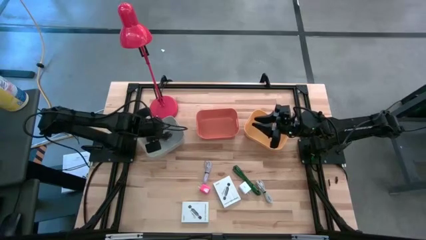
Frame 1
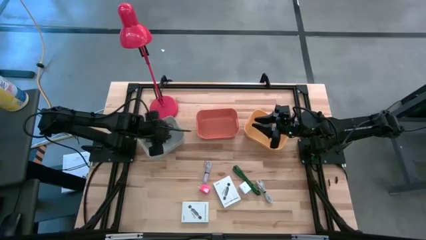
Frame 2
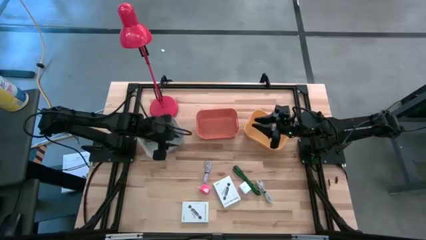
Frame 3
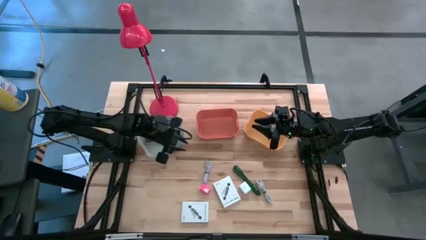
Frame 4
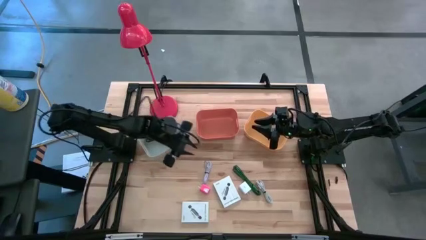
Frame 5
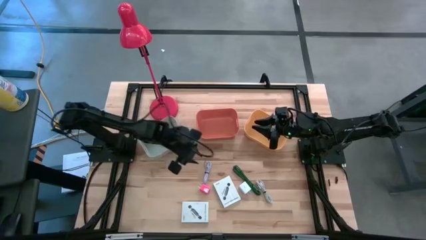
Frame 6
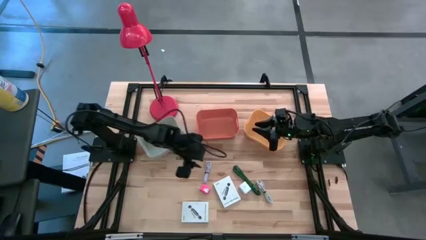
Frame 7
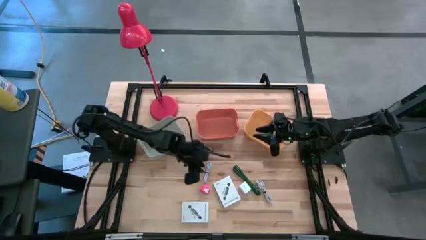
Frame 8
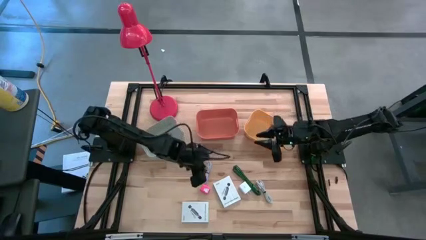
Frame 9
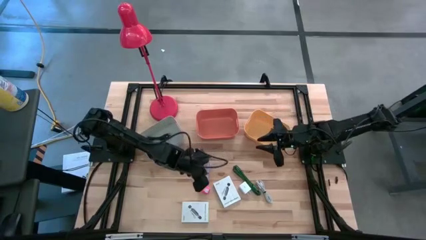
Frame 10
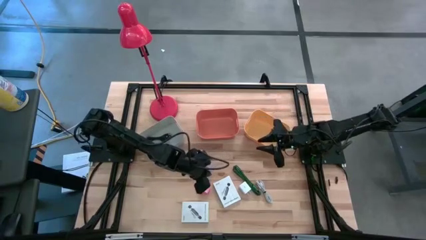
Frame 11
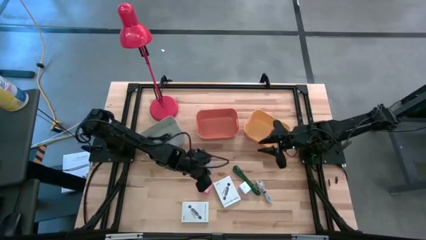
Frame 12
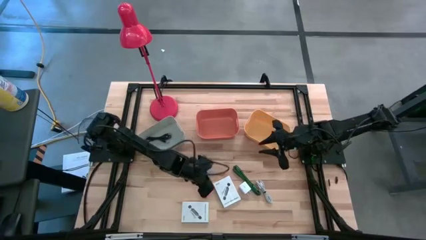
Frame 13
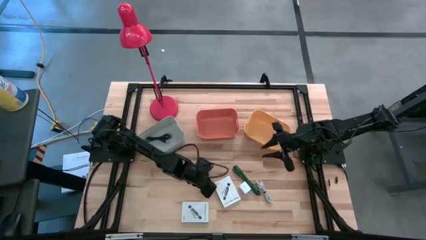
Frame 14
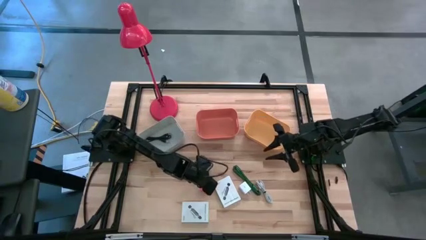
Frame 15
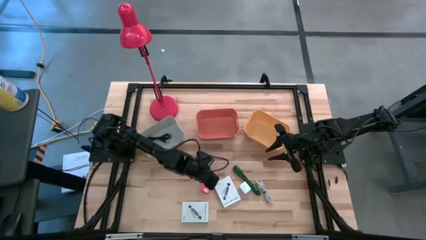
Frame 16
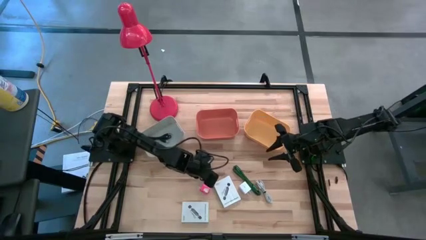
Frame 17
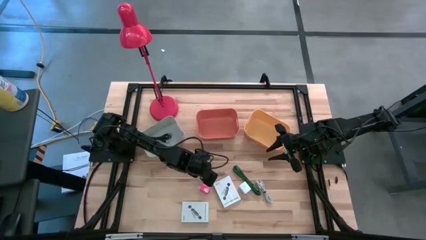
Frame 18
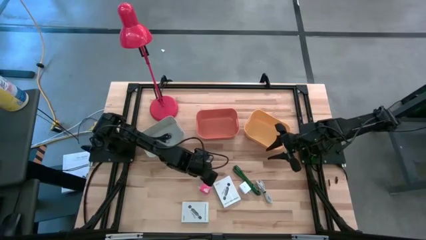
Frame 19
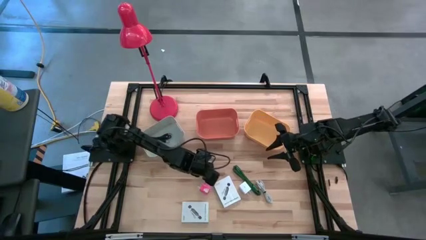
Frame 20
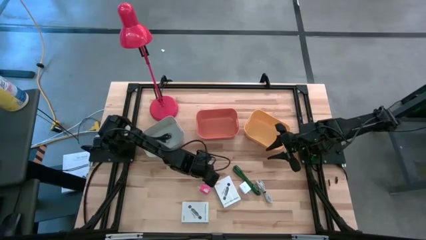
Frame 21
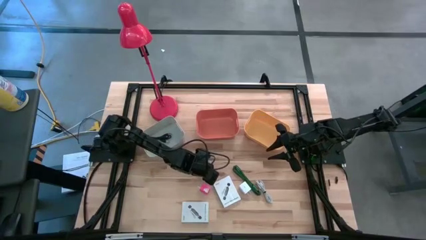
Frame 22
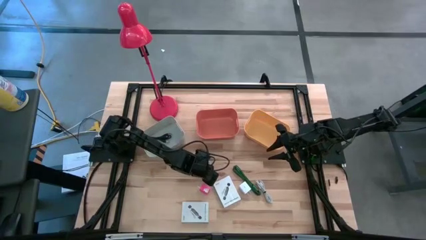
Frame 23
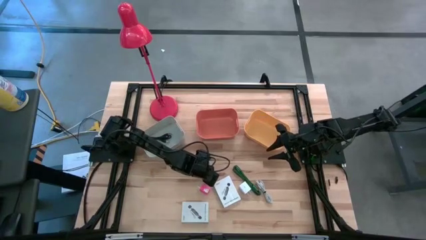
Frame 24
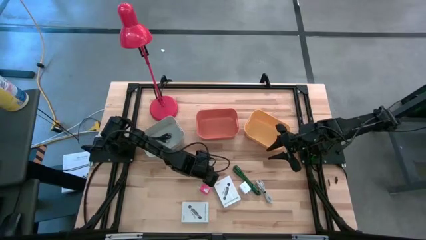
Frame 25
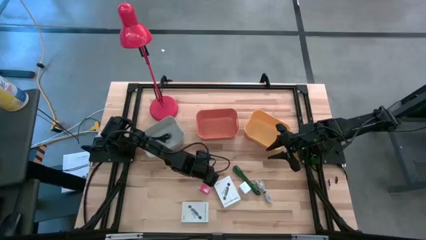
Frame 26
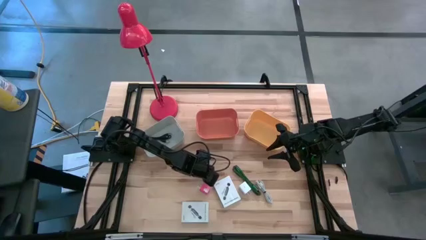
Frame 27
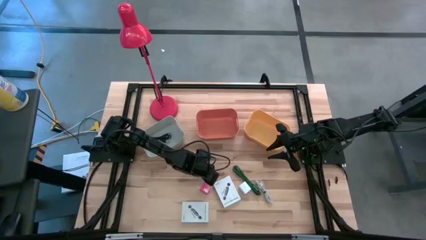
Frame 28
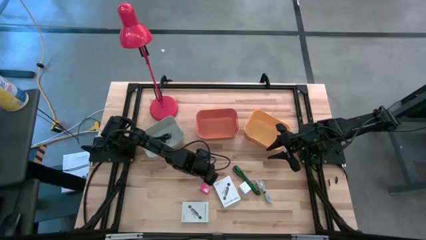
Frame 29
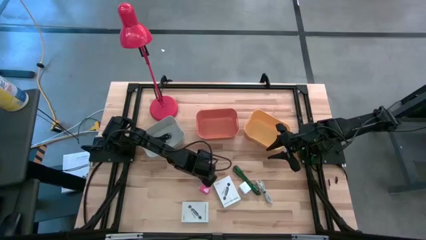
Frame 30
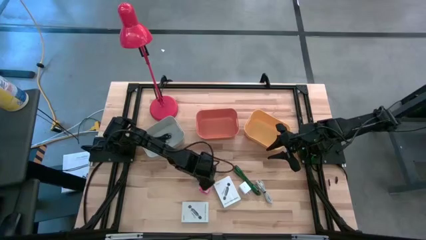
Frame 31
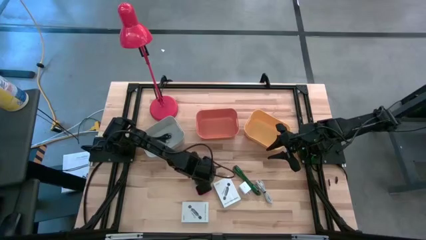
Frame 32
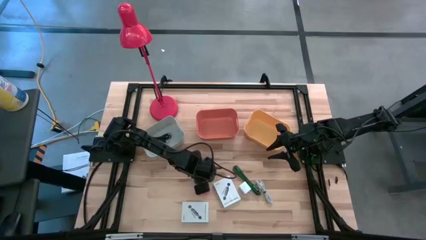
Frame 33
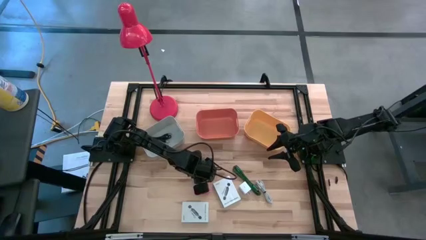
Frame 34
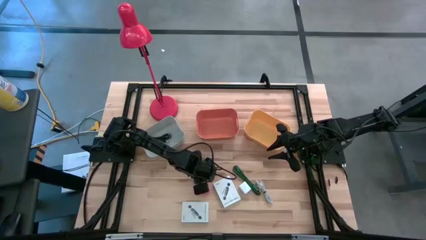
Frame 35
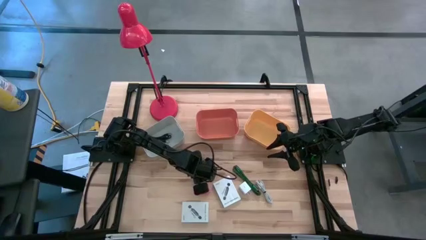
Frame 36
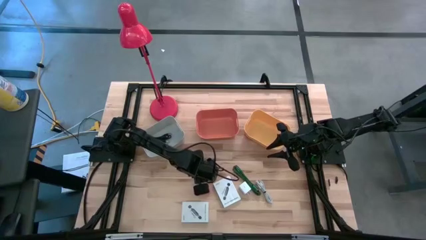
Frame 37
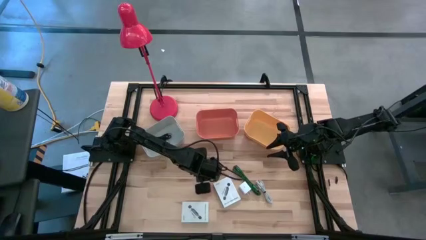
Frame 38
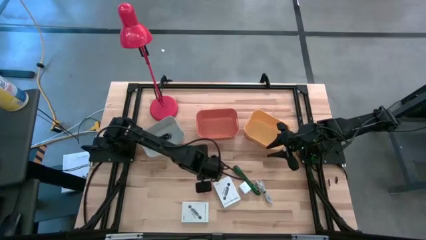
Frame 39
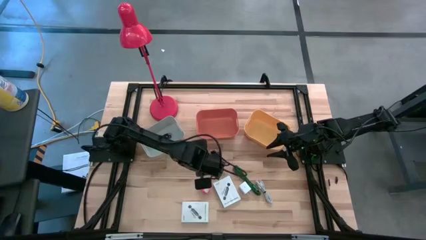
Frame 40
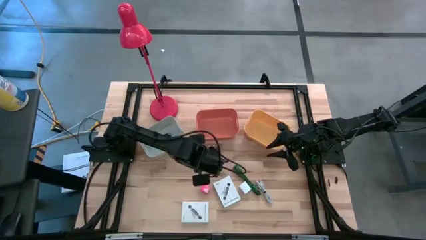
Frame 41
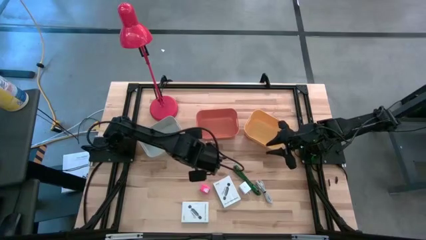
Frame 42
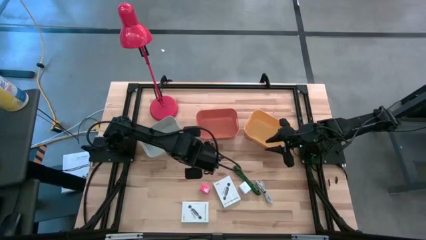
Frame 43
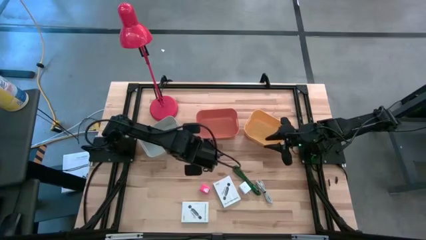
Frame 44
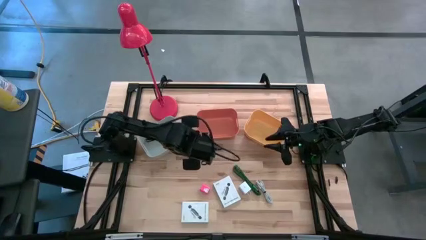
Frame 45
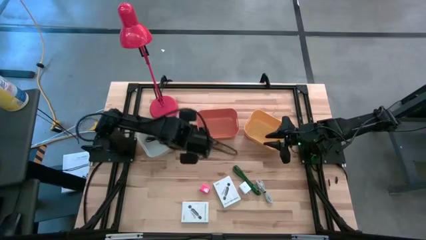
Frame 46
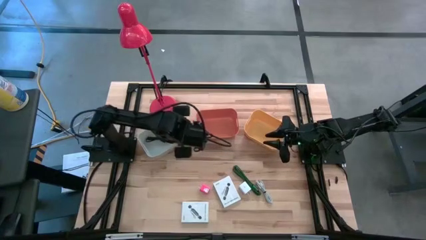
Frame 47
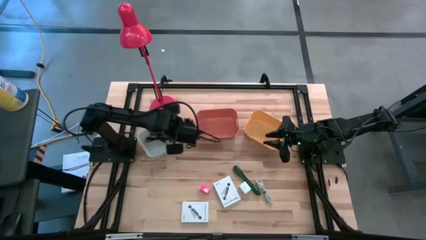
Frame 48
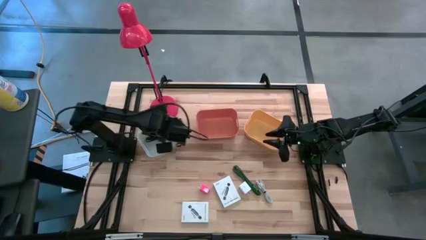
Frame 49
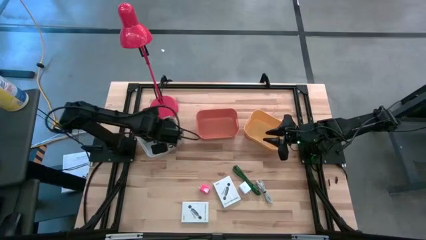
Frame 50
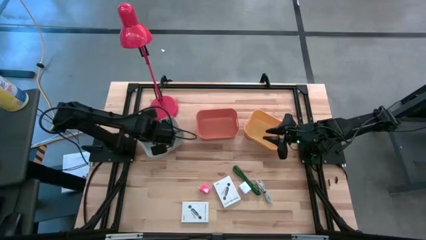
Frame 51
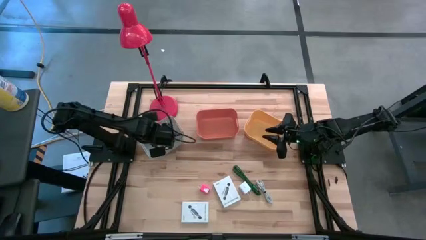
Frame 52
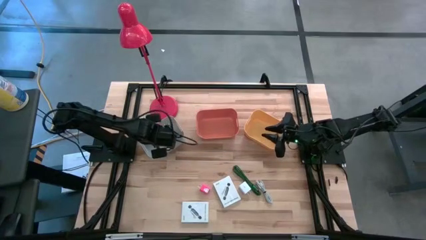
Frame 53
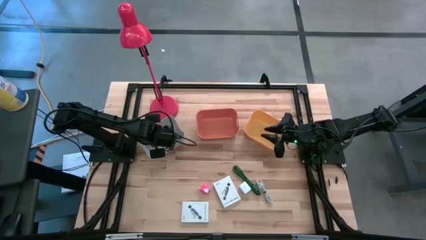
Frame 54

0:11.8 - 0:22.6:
Task: Pick and place items into bin
Put the left white charger cable into the gray bin
